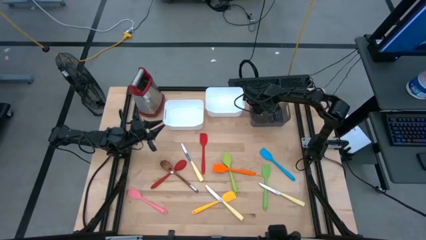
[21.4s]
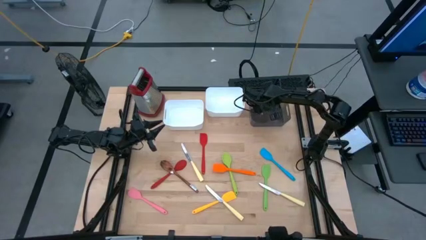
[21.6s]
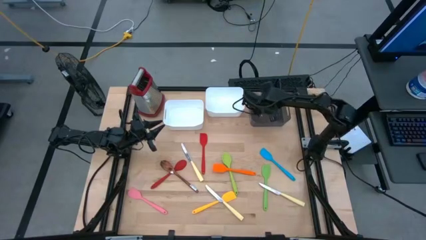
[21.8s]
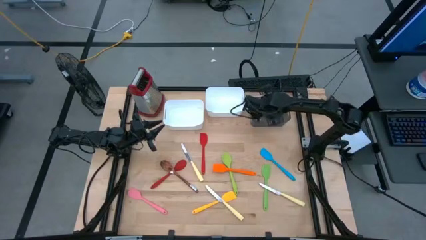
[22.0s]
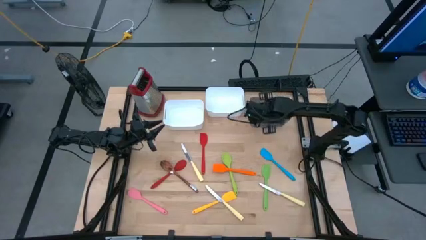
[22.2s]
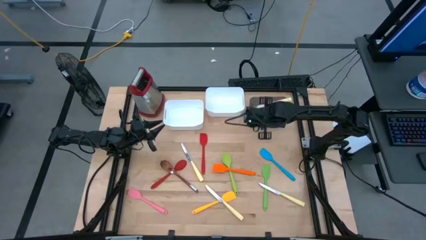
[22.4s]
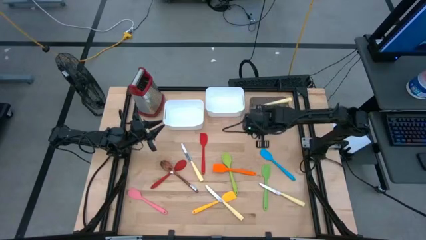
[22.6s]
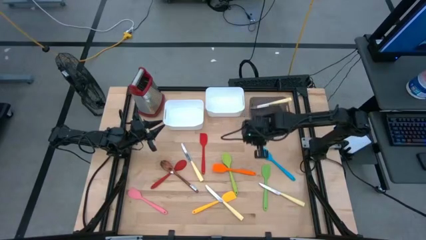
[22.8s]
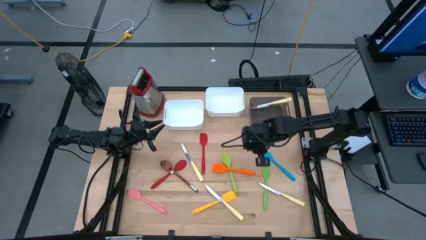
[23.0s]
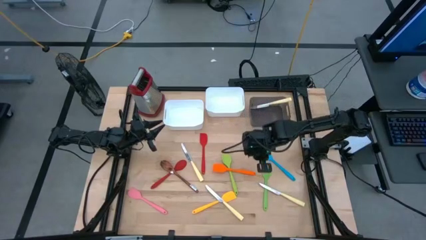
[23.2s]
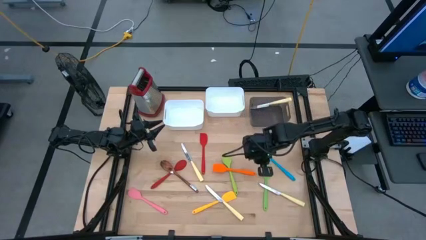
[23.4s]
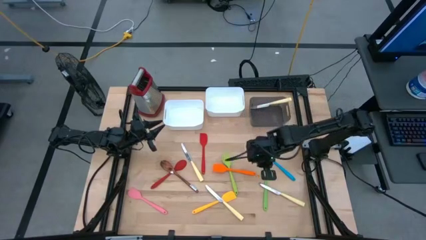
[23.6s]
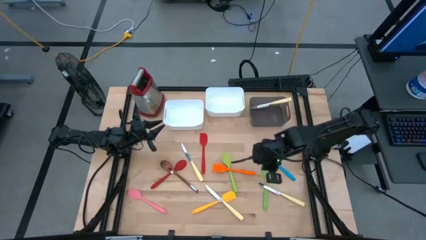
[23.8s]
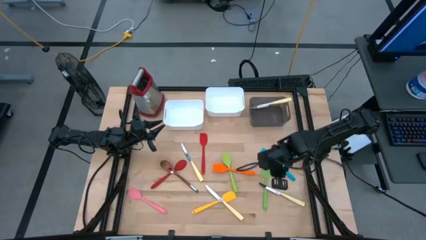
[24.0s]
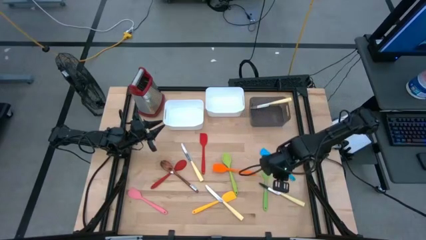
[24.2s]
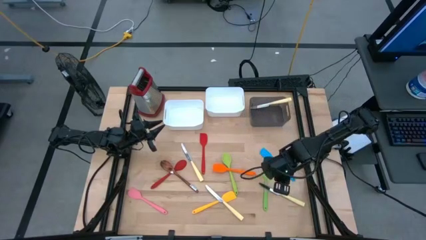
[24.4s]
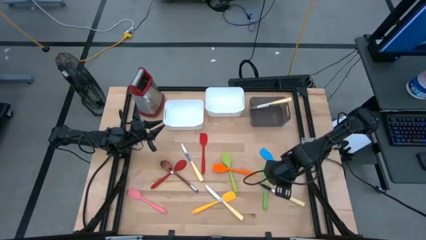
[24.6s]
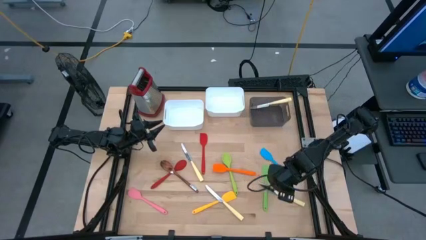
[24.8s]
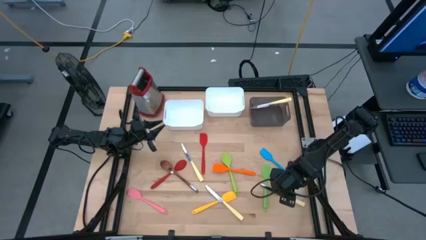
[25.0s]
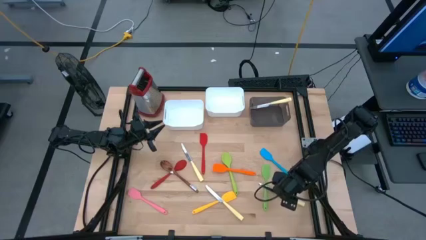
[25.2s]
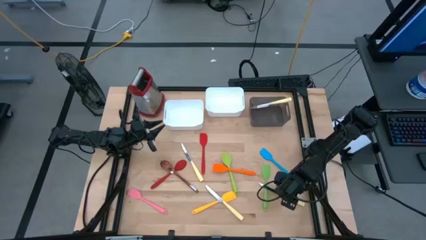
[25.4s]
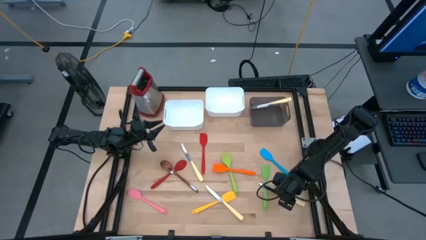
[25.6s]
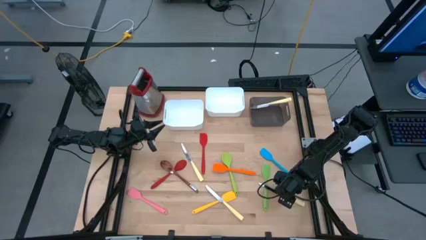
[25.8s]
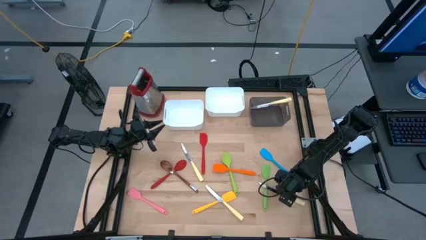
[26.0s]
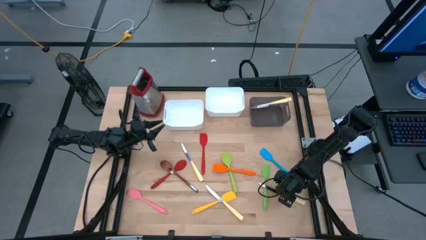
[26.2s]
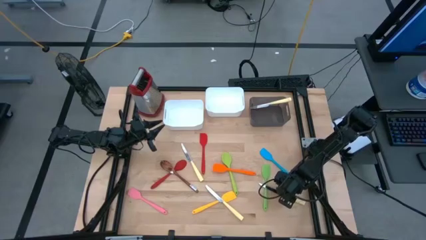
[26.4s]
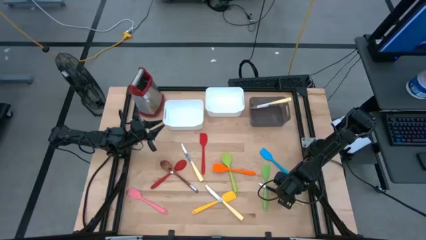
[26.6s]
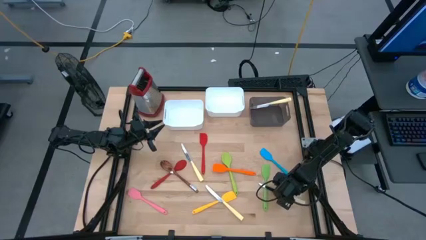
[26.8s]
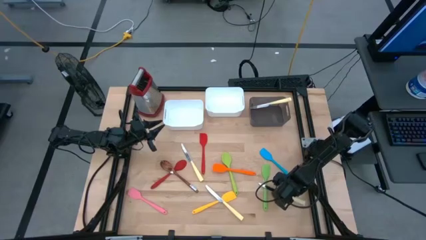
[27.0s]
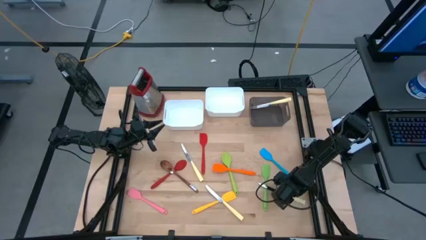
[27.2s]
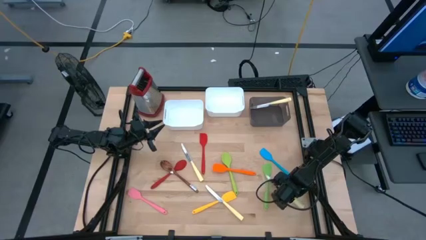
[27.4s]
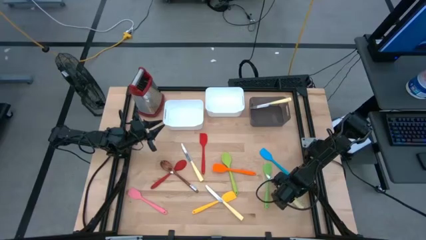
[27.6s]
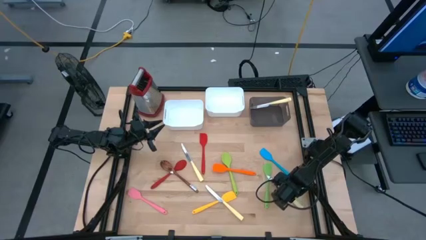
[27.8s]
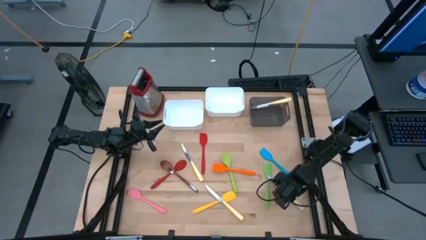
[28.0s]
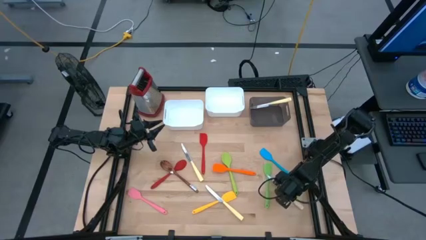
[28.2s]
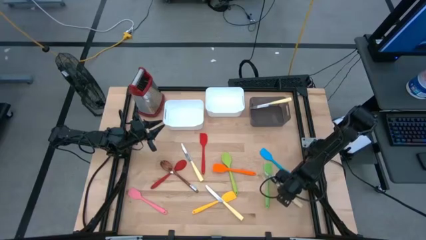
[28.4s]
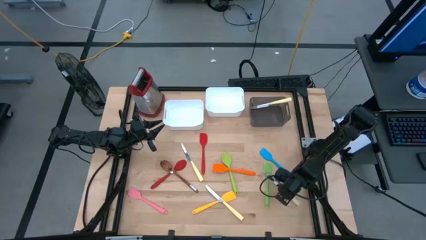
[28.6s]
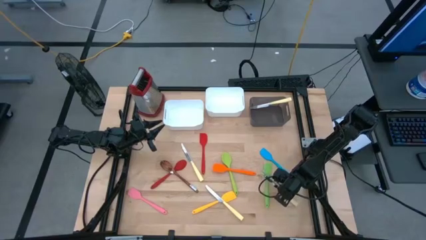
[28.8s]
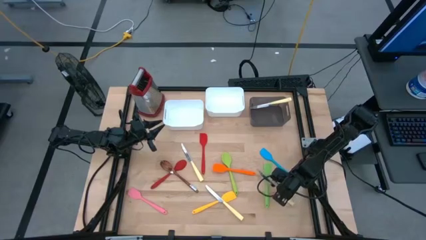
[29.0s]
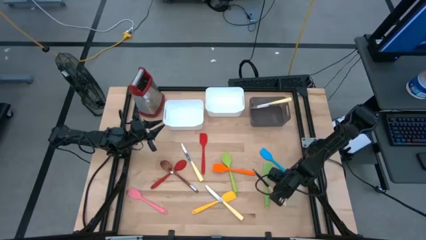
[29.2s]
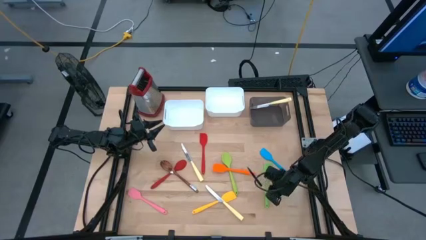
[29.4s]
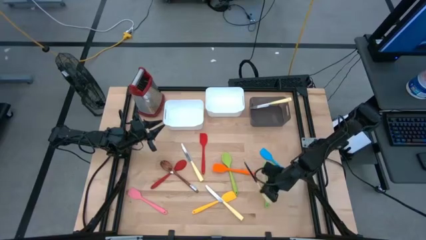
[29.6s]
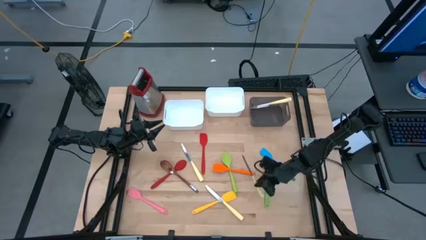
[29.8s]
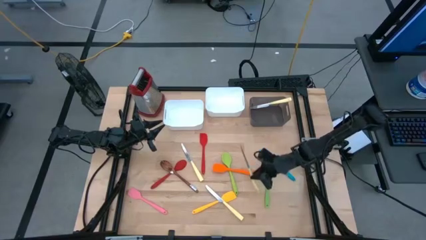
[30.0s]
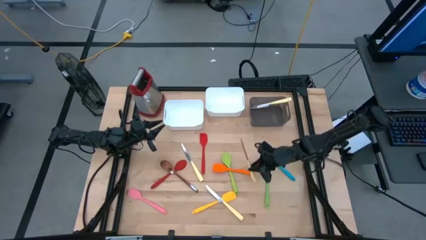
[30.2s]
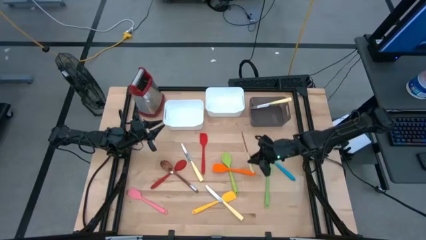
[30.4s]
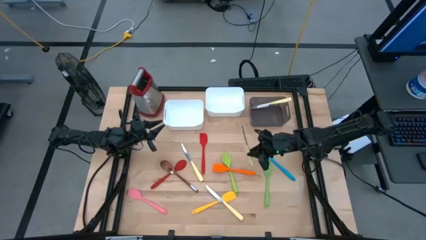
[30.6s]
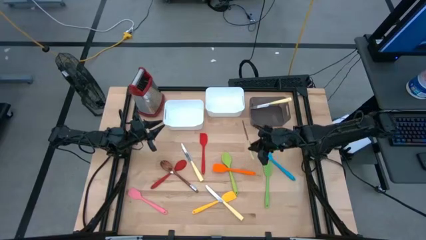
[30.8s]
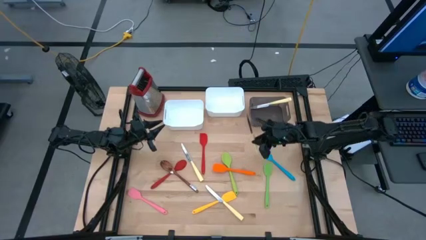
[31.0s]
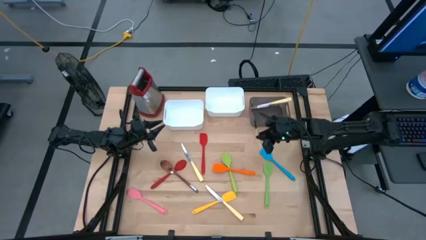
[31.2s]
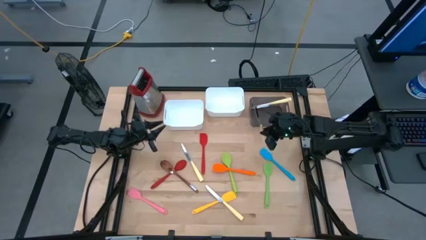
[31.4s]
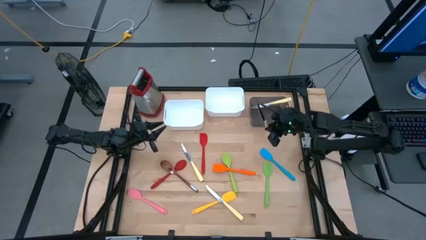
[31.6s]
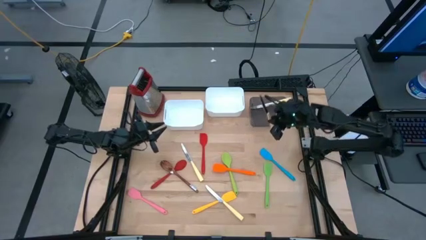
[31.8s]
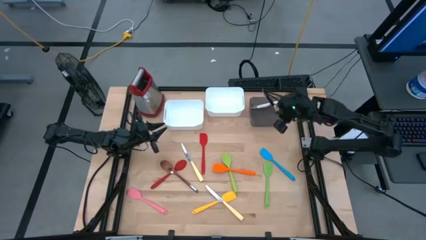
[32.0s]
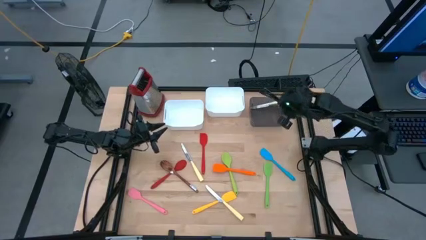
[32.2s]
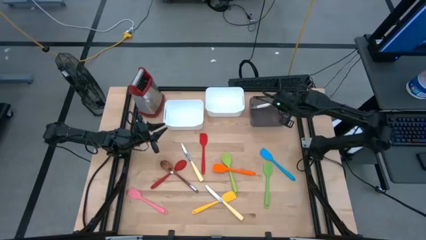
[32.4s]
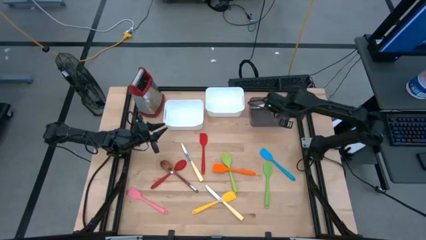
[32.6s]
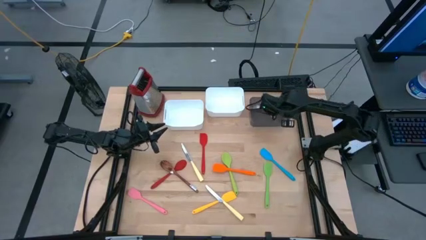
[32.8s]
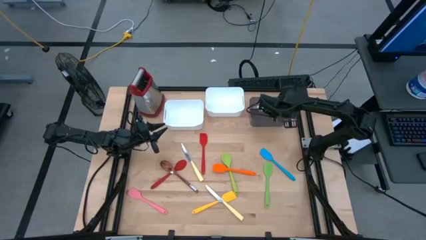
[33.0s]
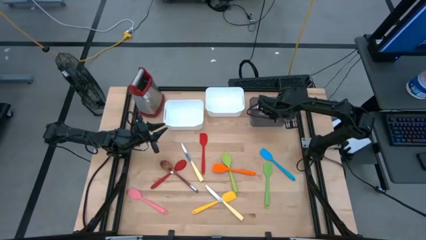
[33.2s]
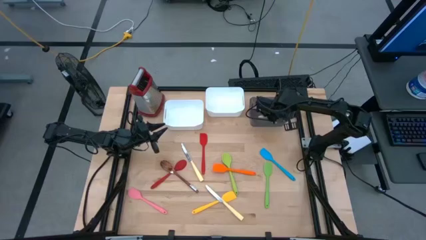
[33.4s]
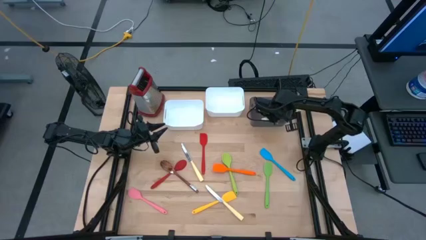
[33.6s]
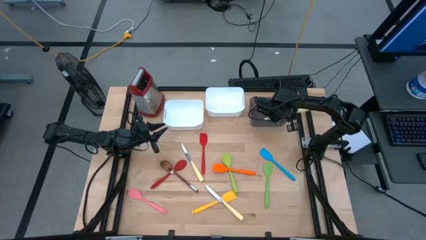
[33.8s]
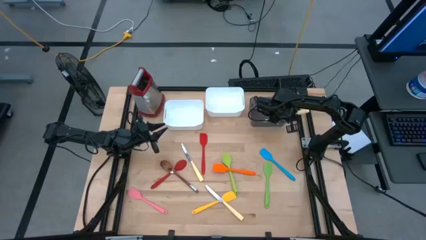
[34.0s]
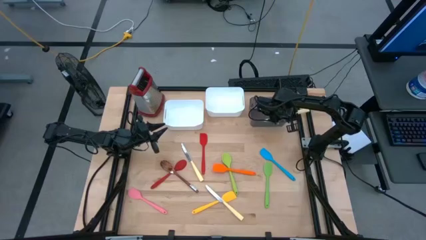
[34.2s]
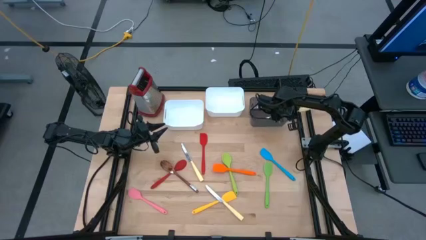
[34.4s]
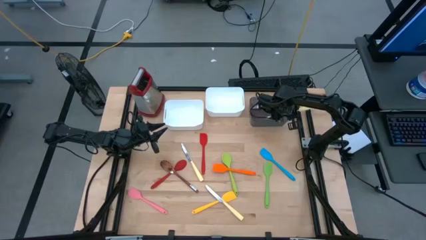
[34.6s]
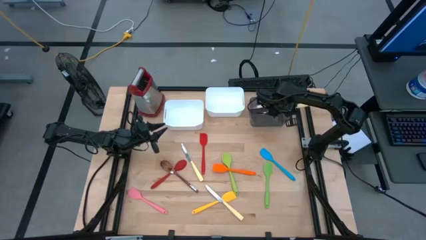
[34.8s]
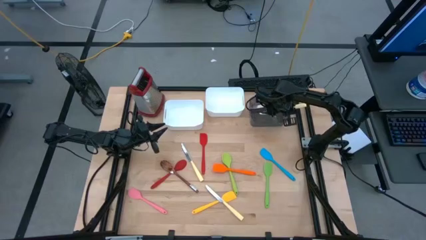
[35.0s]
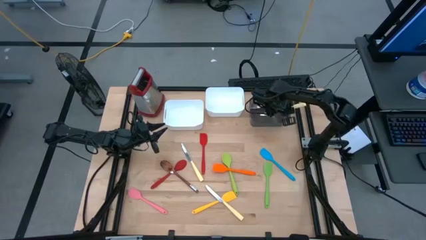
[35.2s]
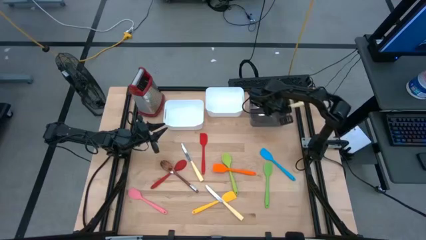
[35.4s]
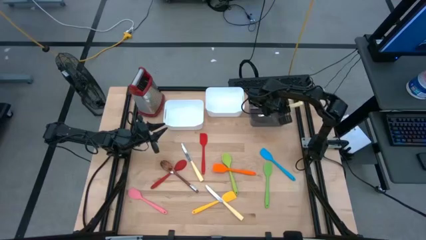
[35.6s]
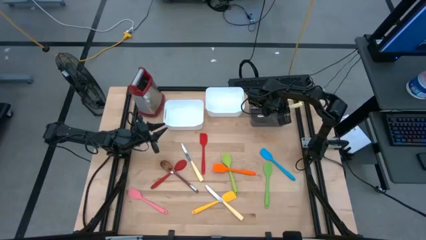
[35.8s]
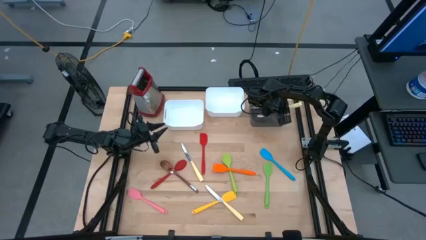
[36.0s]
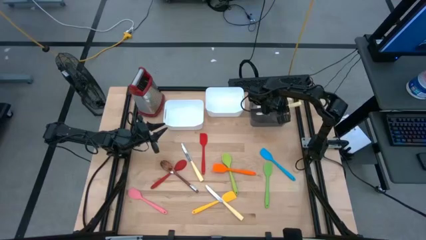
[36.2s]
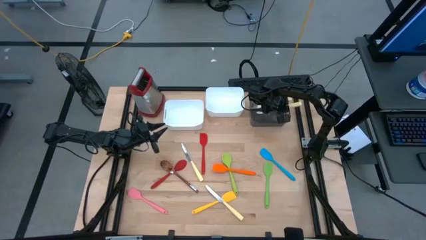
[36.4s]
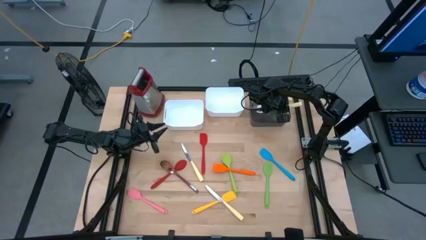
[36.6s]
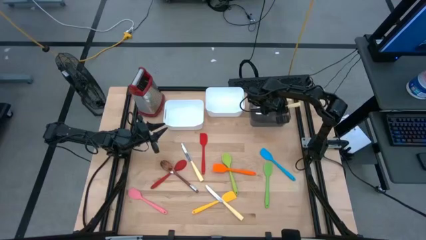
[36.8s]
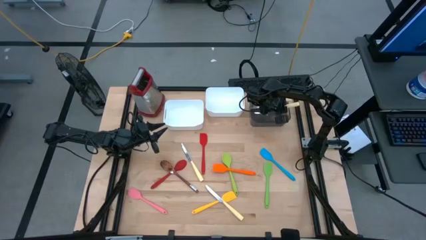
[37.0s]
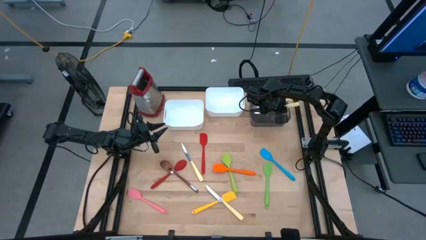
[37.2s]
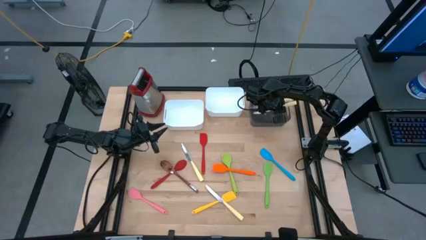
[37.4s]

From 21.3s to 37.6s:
Task: Pick & Place Kitchen Items
Put the yellow knife into the black bin
